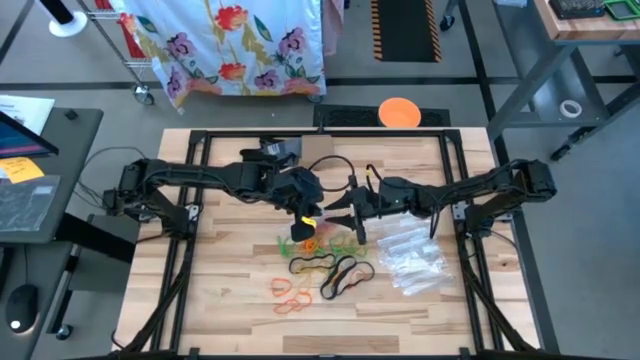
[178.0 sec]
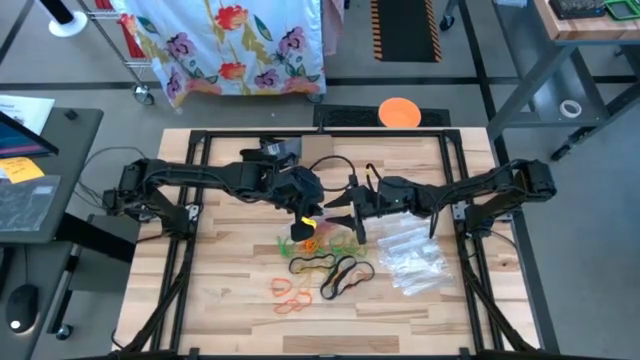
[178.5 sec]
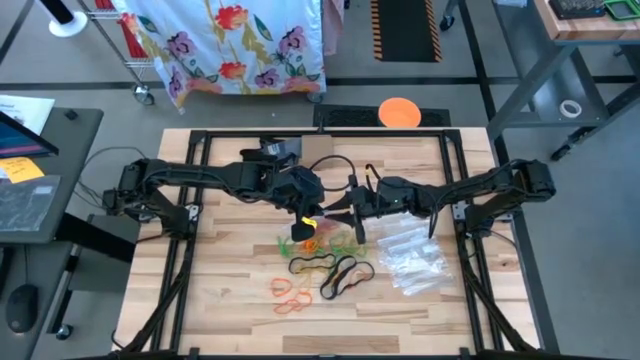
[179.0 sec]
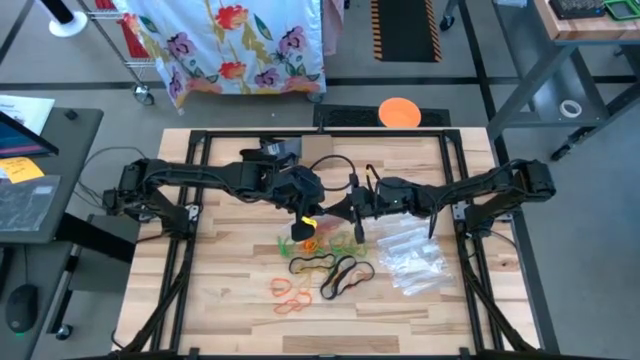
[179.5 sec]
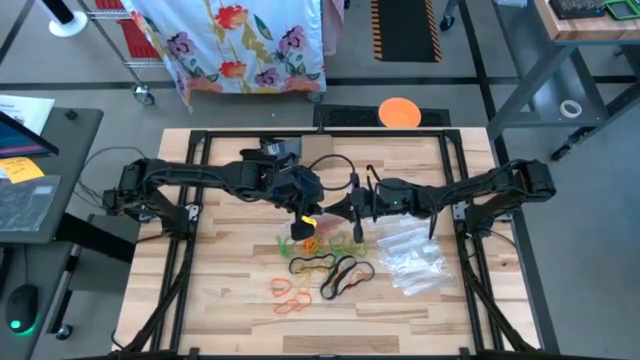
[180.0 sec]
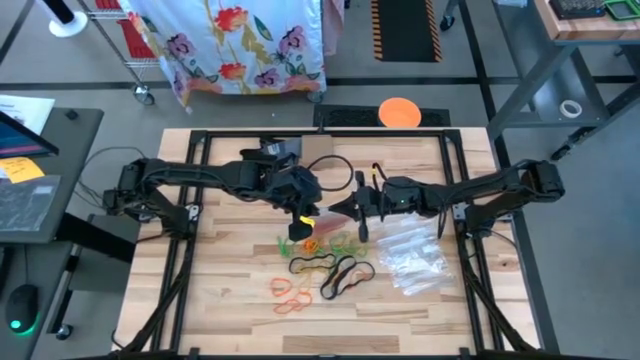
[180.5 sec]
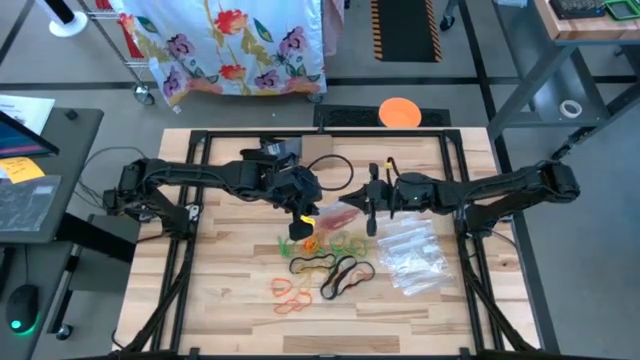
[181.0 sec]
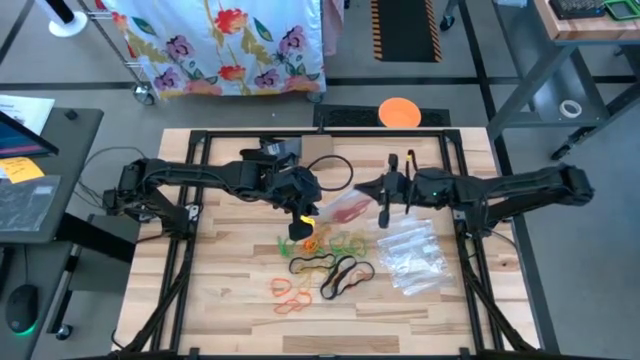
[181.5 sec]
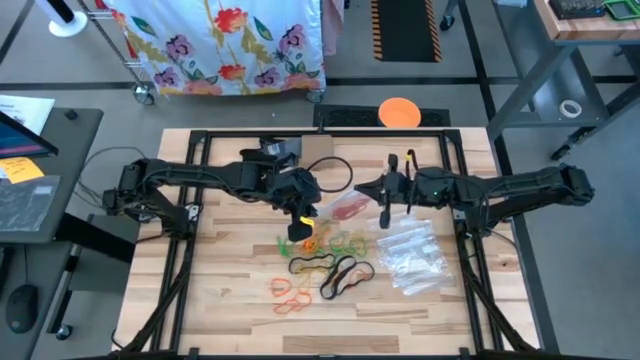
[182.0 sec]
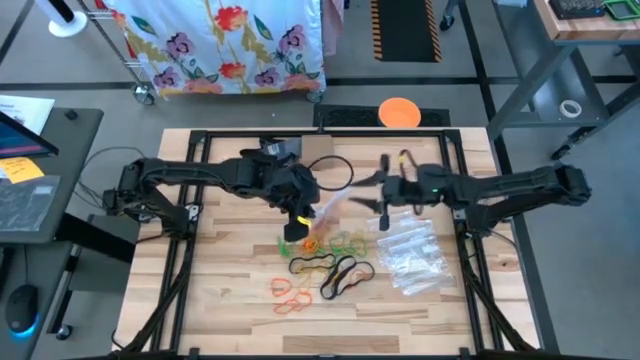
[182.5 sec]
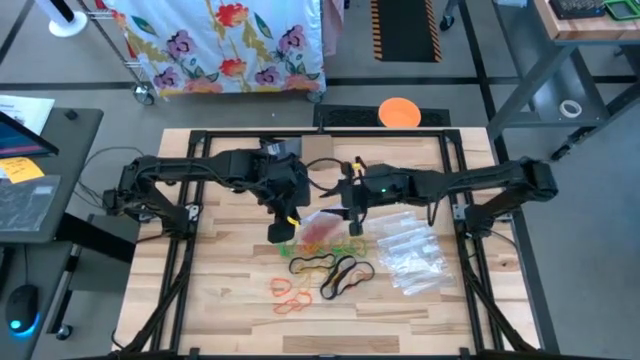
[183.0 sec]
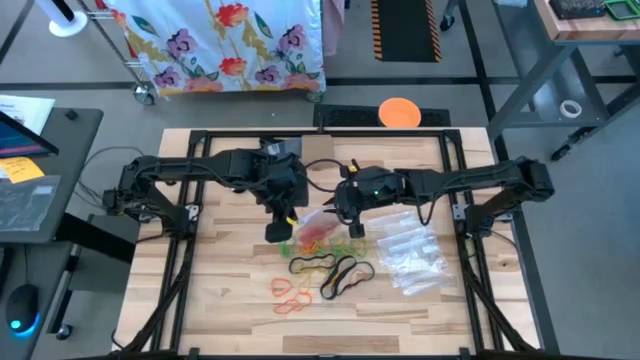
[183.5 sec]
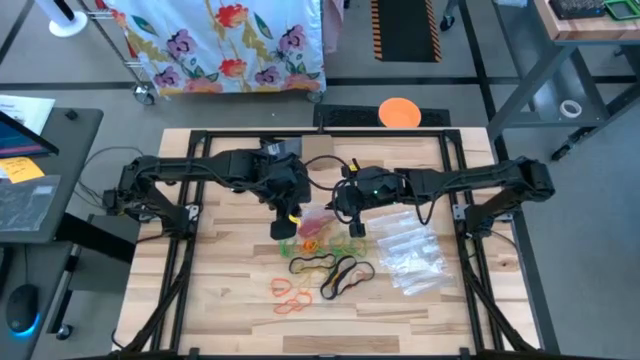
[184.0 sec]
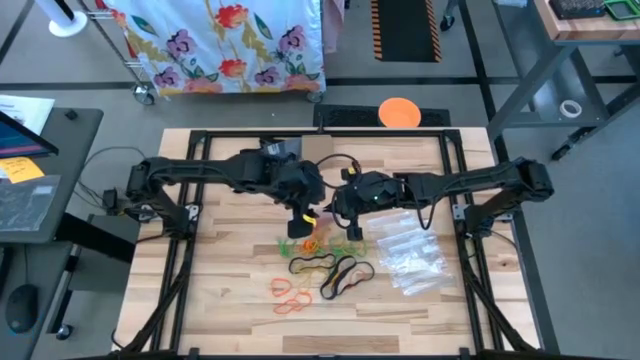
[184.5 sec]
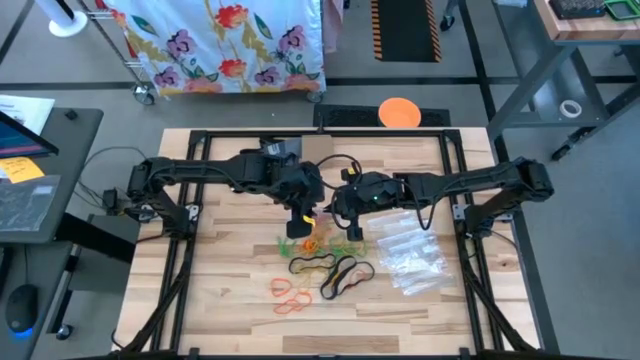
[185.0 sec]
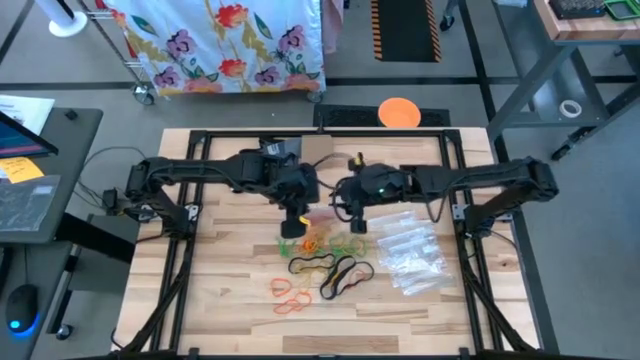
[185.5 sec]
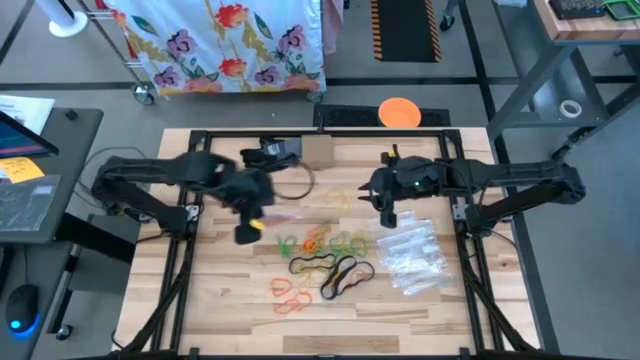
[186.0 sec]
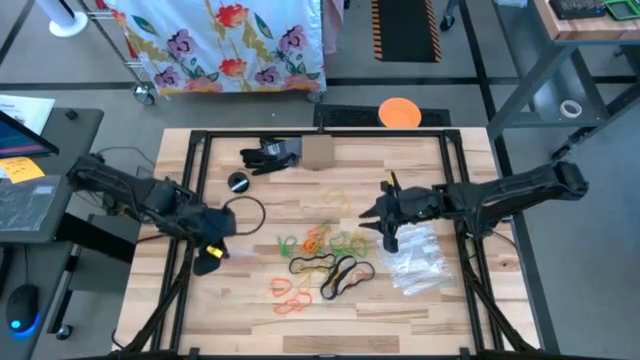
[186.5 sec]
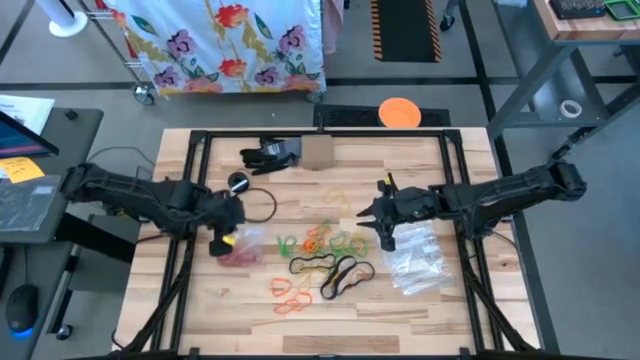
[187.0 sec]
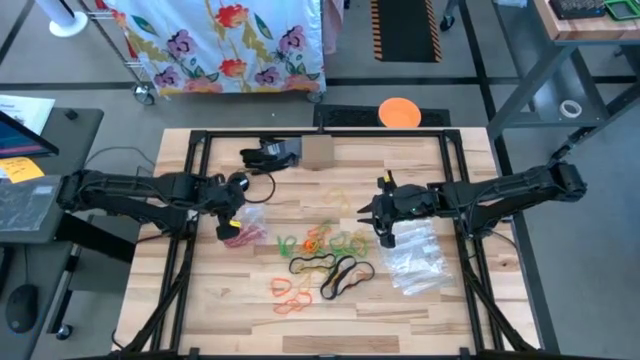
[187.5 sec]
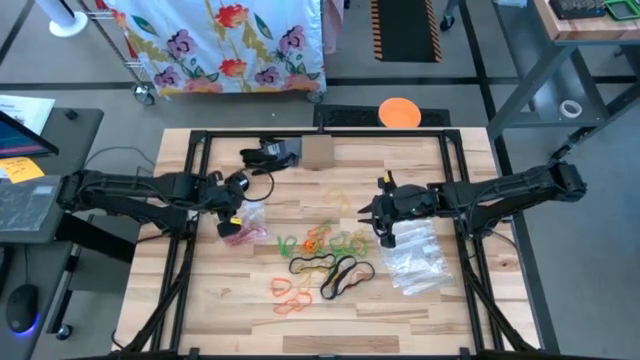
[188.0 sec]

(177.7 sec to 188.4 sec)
Task: Sort rubber bands
Close the transparent zip bag

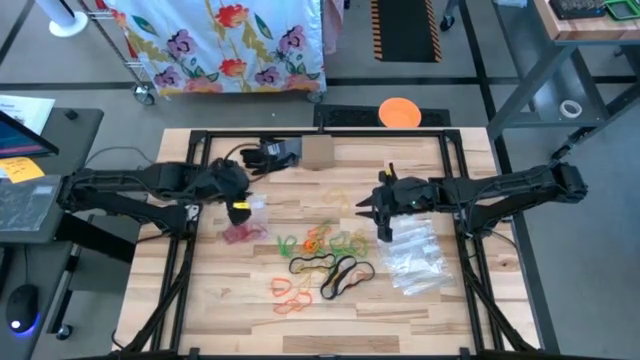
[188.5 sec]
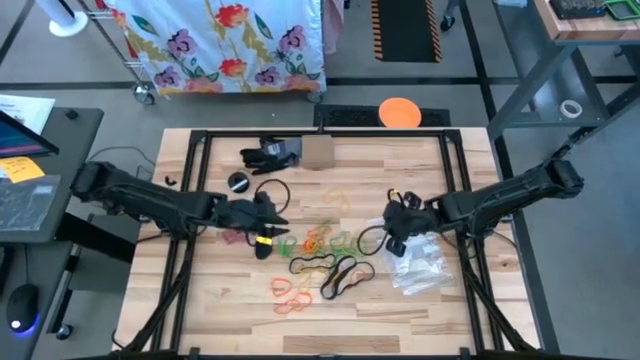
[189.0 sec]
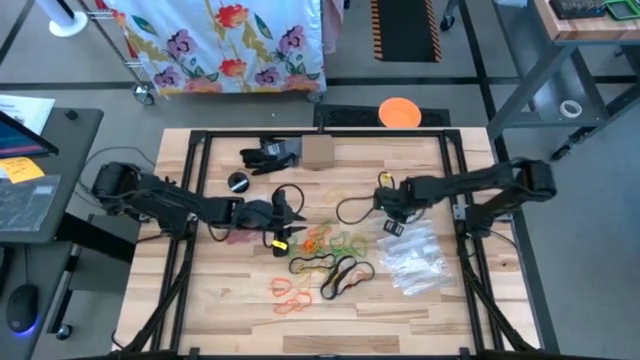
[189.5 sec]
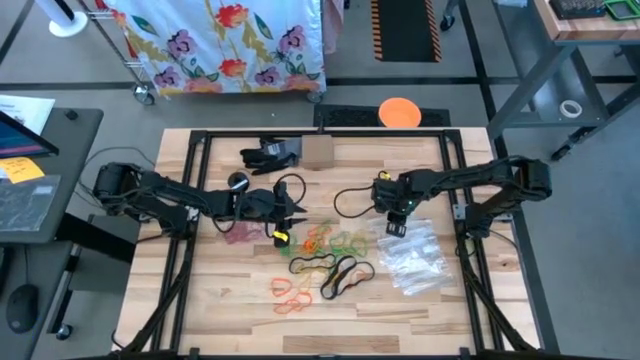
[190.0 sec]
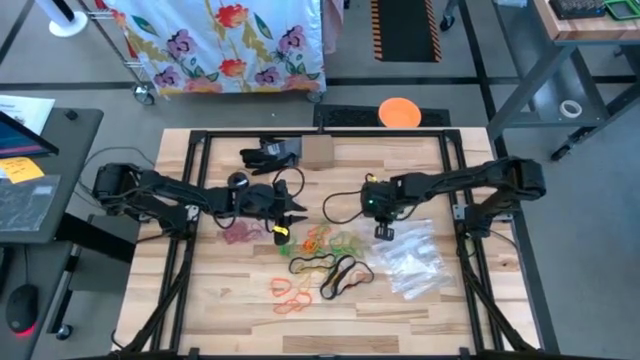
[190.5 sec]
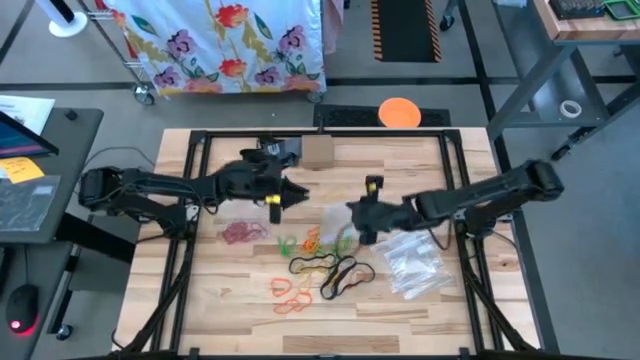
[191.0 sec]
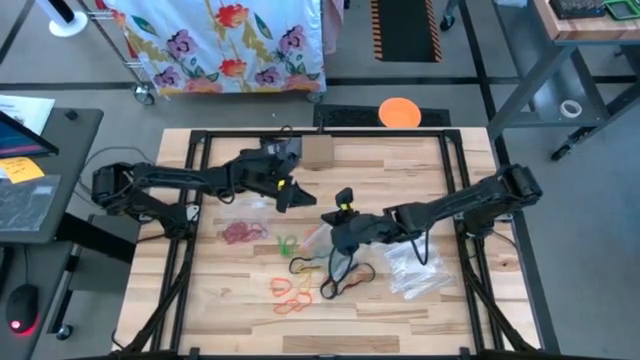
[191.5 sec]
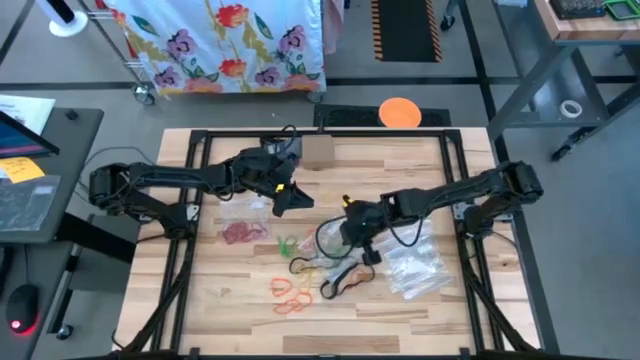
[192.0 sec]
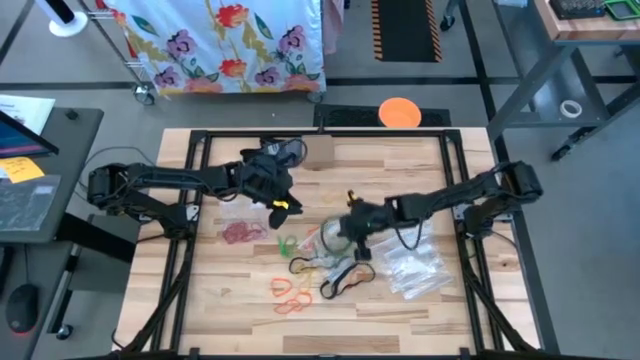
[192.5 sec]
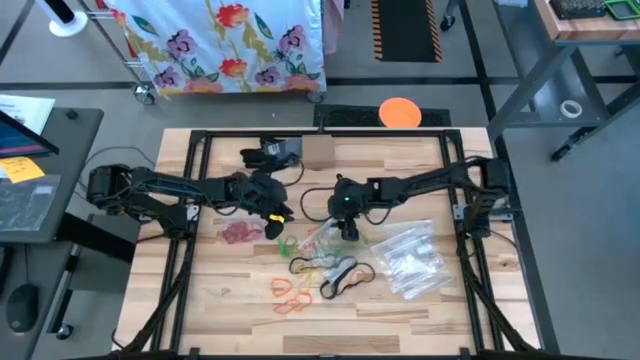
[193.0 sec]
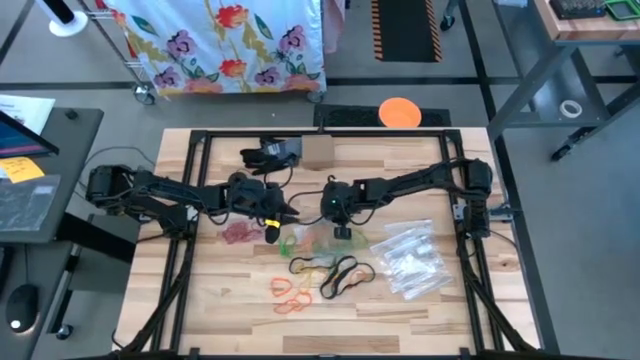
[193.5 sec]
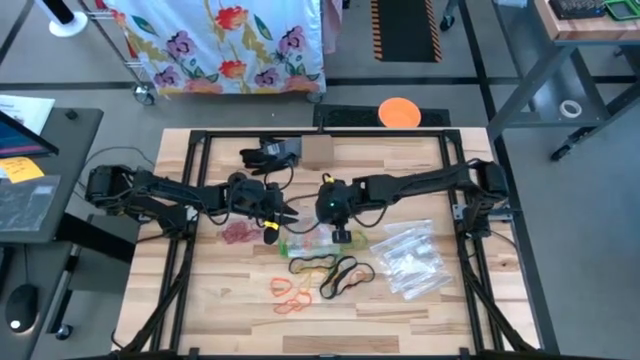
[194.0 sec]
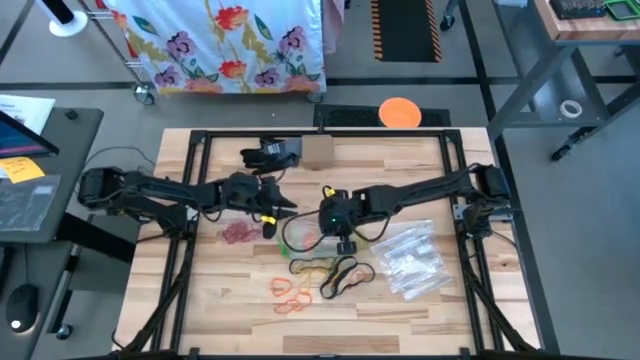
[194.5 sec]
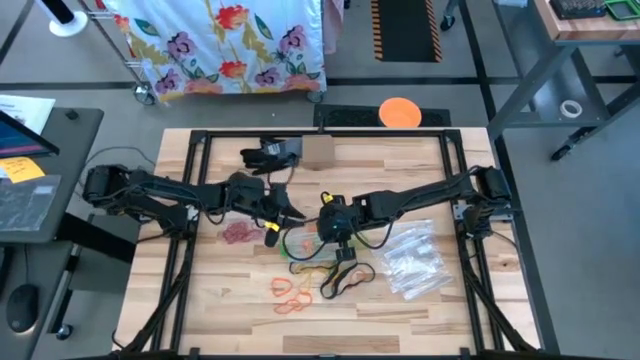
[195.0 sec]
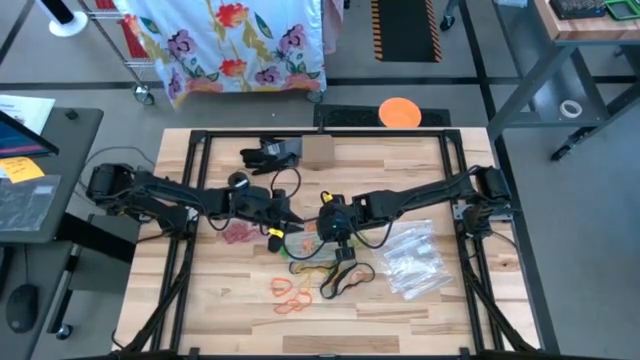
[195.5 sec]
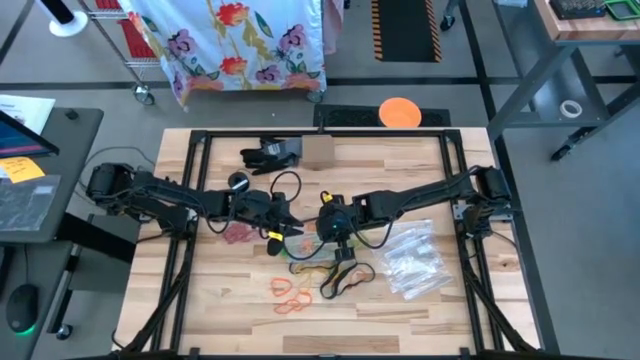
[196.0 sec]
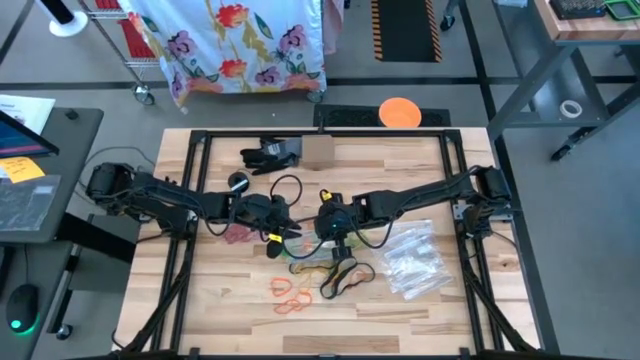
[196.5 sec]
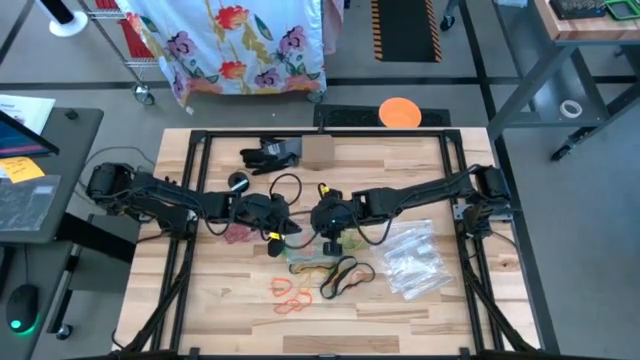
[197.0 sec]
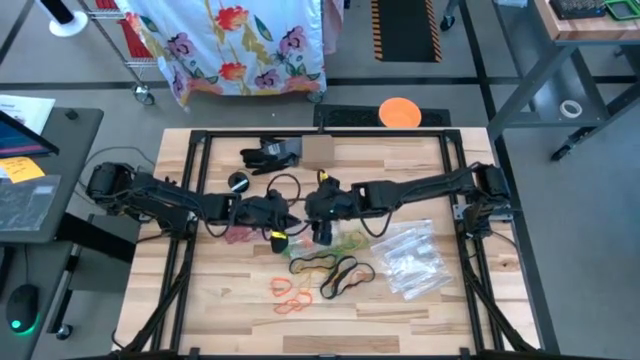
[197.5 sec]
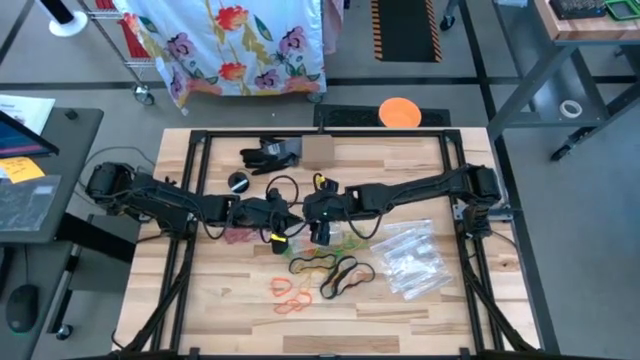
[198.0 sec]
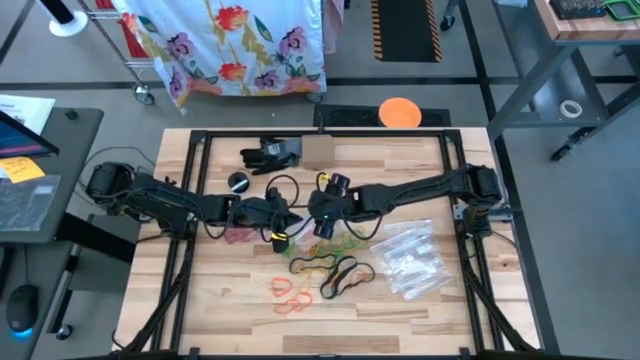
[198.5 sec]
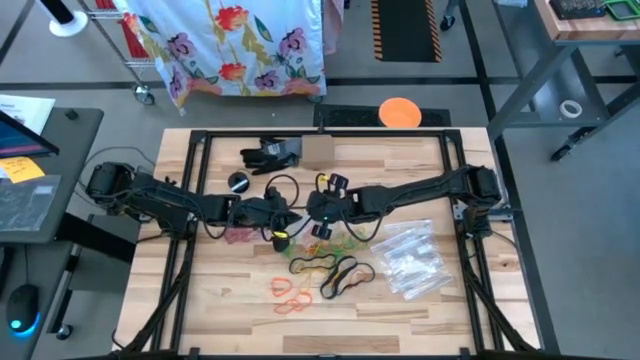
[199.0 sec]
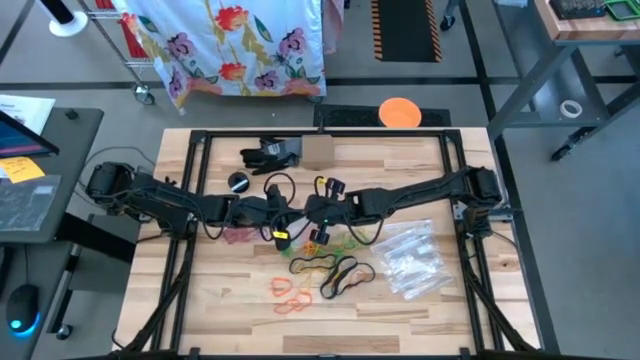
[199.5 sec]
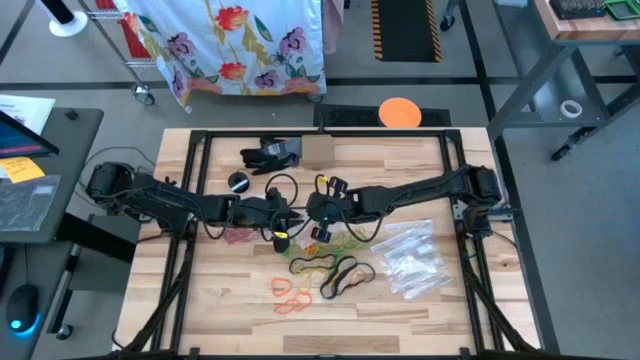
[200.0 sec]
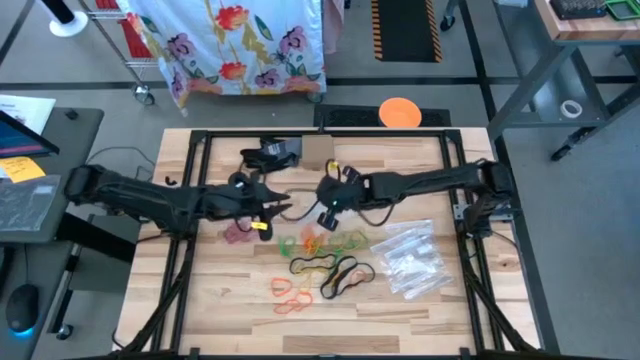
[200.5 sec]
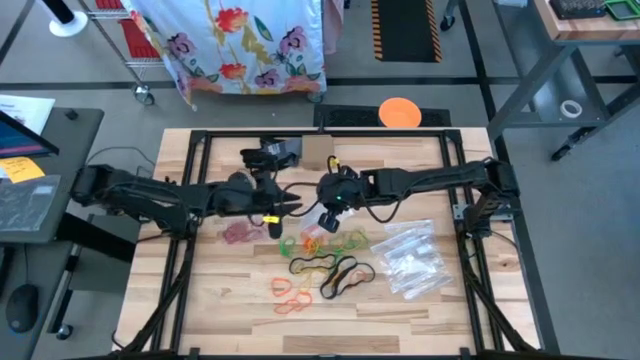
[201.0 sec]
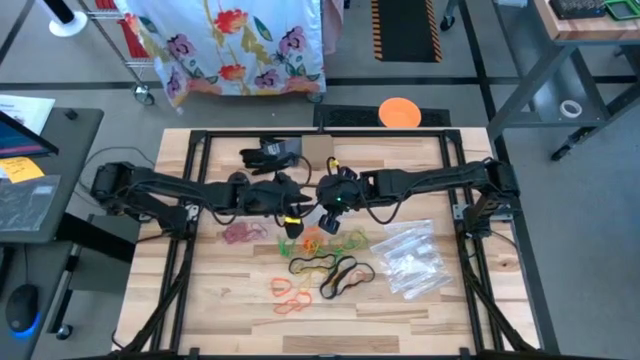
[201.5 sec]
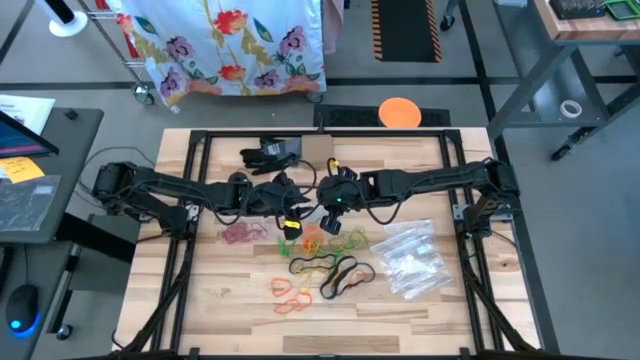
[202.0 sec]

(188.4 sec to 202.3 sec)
Open the transparent zip bag
